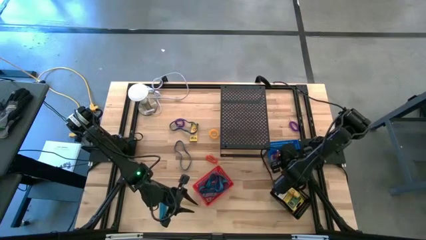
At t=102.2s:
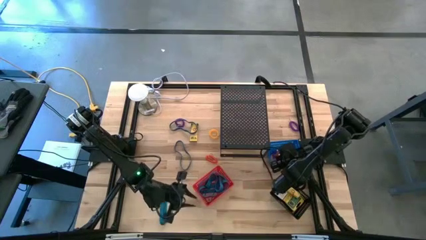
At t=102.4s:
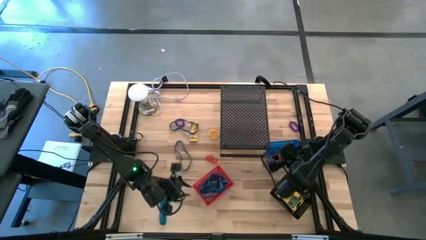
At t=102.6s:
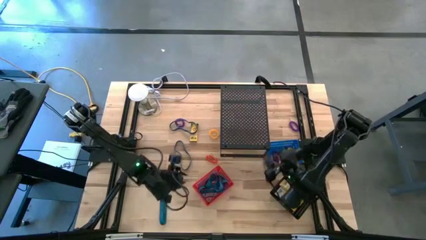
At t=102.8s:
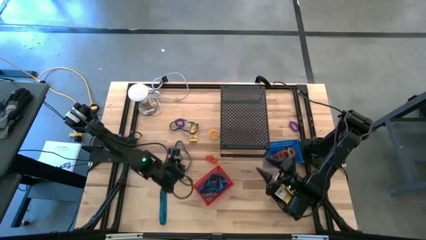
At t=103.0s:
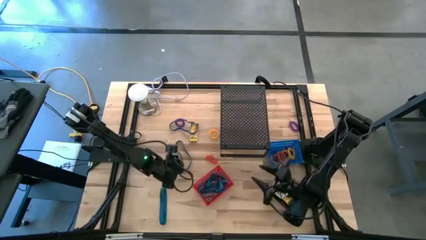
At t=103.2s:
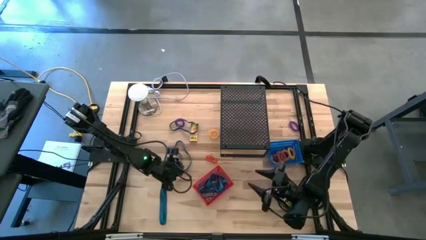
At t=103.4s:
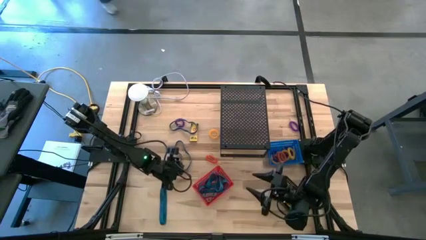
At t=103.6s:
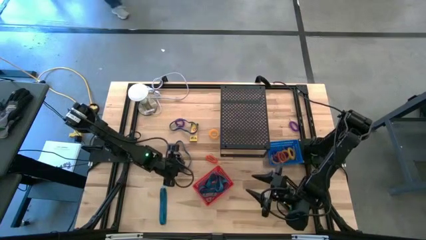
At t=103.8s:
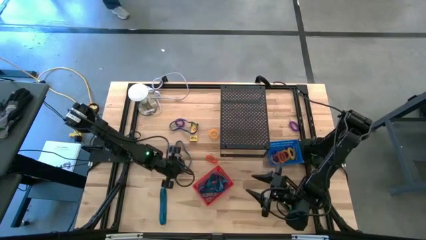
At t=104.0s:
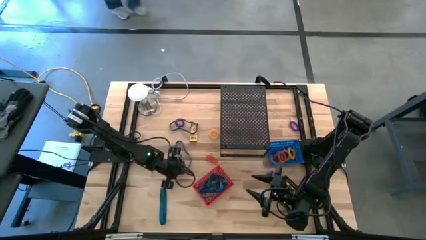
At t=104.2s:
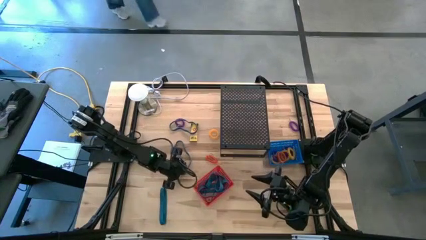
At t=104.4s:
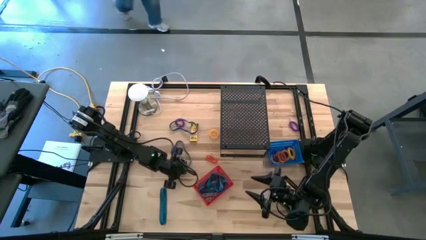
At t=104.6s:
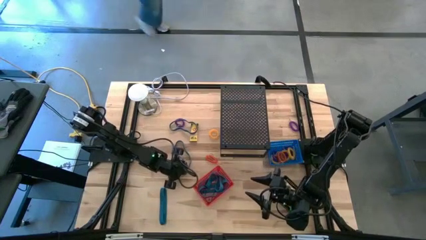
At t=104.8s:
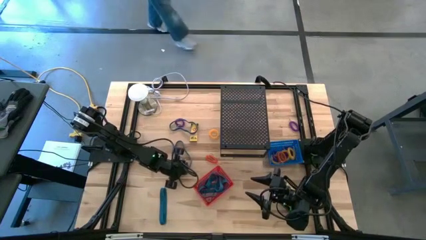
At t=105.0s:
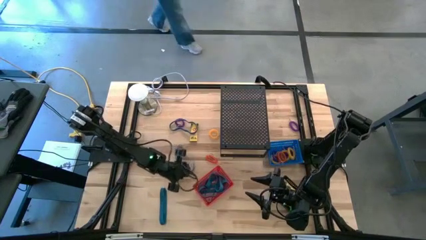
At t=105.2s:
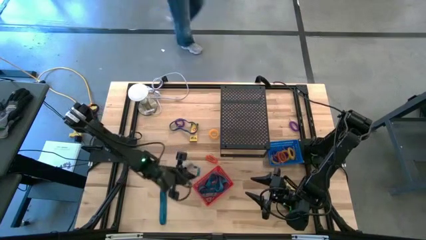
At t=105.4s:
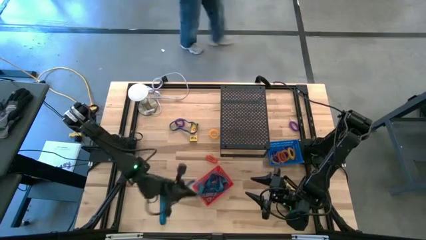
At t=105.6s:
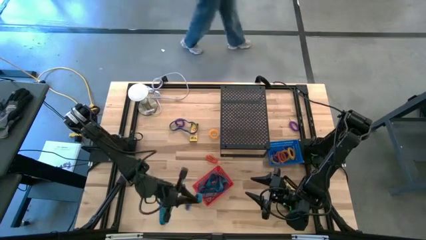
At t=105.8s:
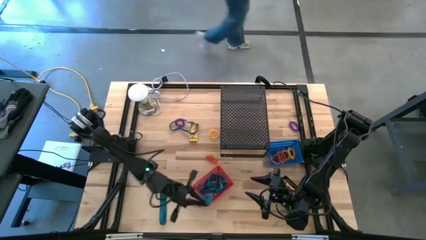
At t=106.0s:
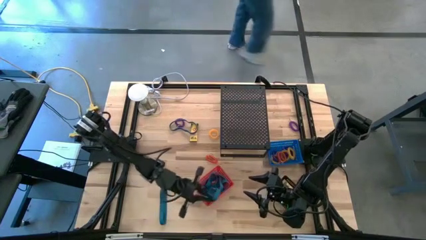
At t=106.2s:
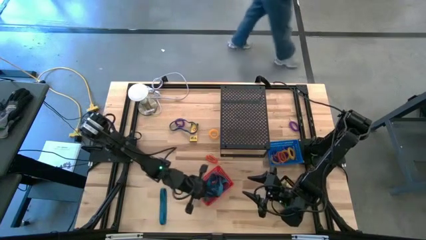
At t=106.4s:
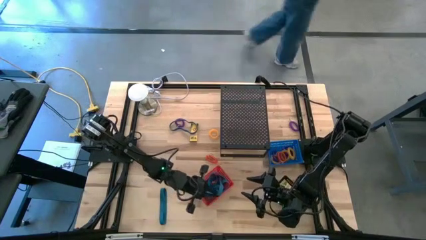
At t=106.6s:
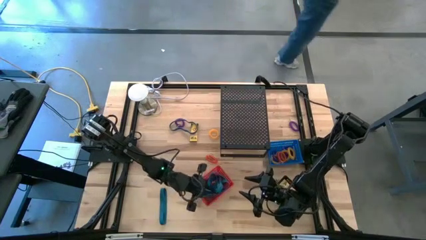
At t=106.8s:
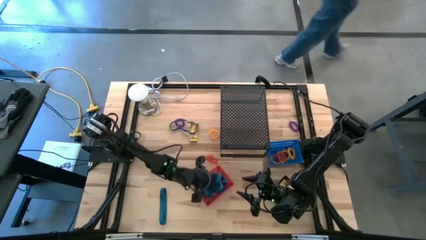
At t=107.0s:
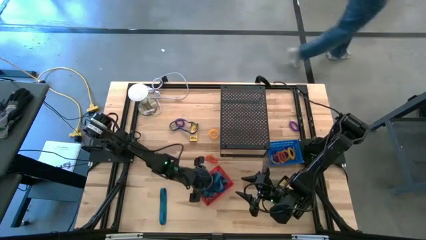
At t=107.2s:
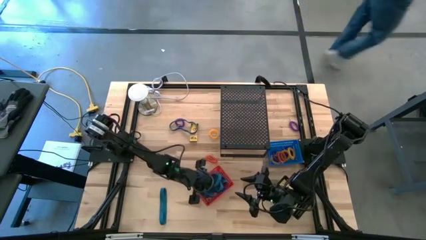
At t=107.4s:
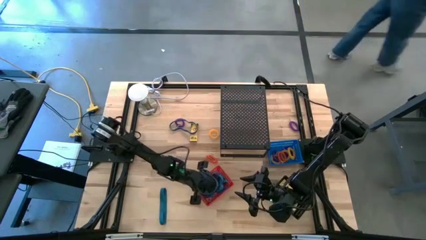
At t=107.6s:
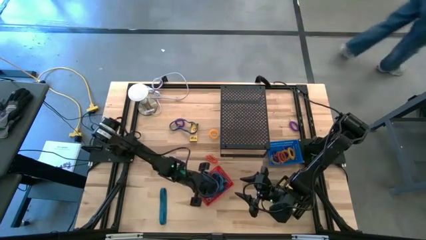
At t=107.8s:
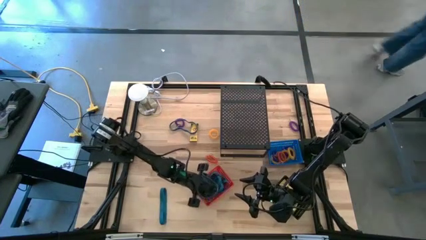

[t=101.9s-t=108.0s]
Task: Pick & Place Office Desk Supplies
Put the blue rubberband into the red basket

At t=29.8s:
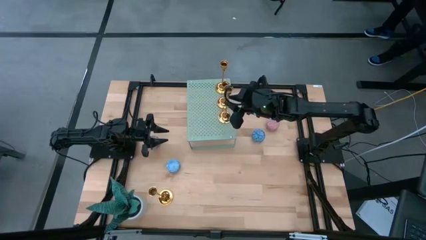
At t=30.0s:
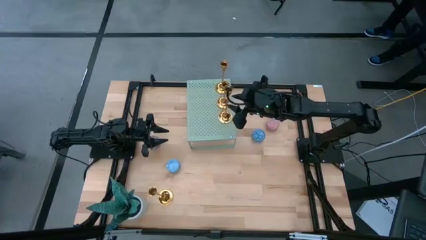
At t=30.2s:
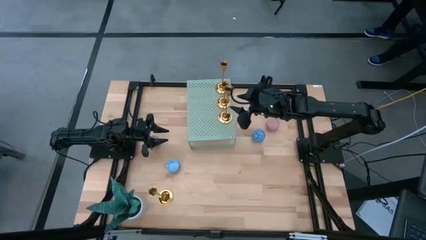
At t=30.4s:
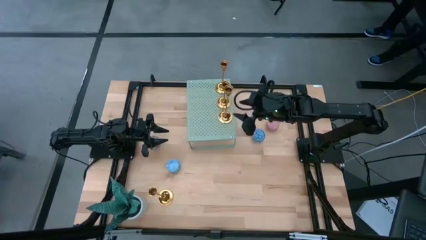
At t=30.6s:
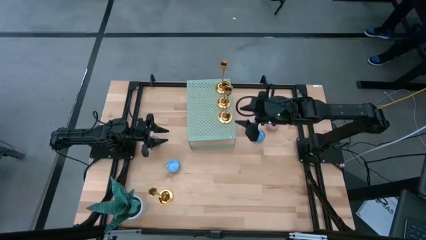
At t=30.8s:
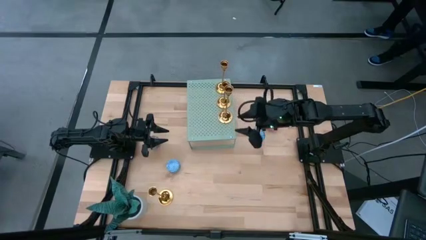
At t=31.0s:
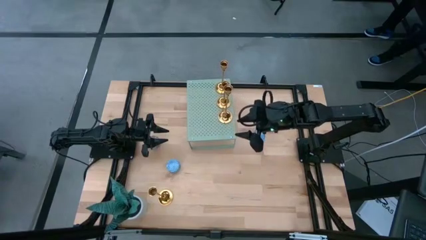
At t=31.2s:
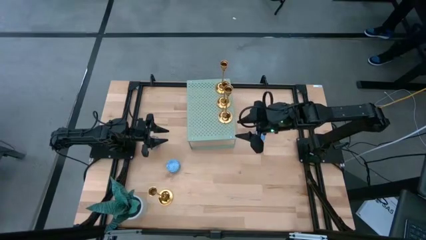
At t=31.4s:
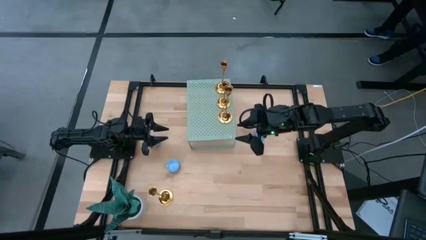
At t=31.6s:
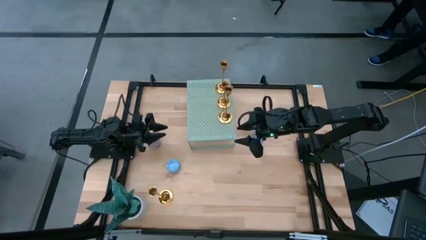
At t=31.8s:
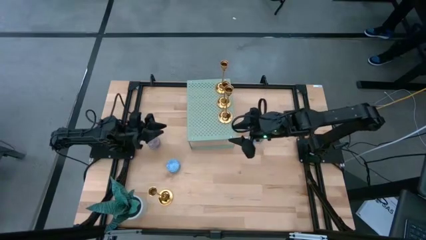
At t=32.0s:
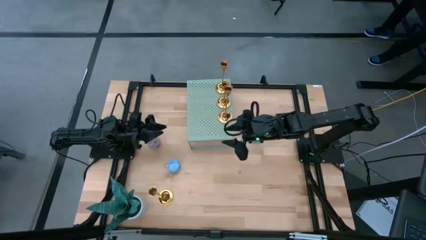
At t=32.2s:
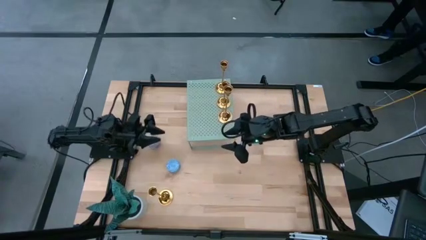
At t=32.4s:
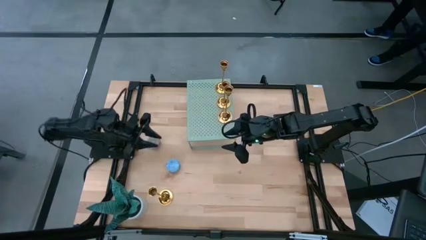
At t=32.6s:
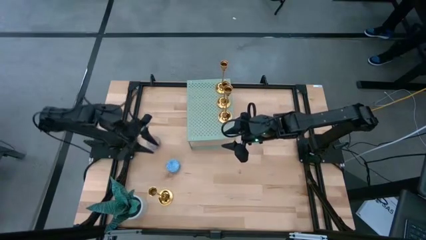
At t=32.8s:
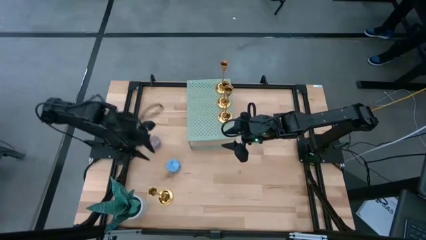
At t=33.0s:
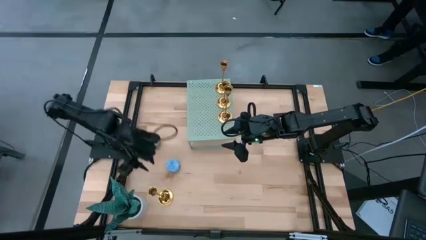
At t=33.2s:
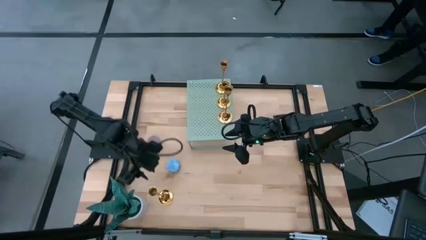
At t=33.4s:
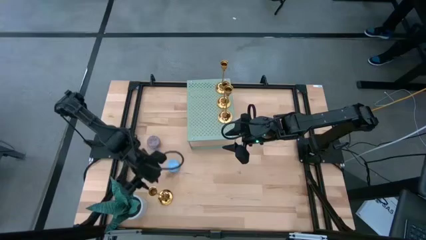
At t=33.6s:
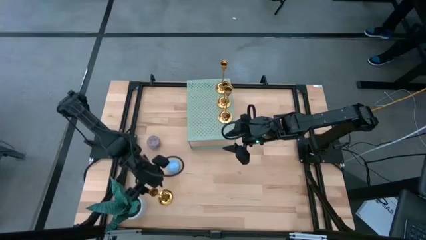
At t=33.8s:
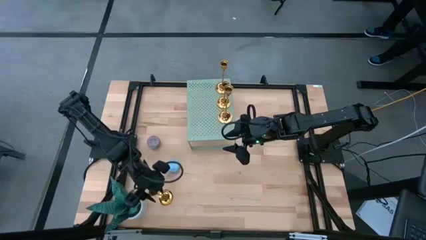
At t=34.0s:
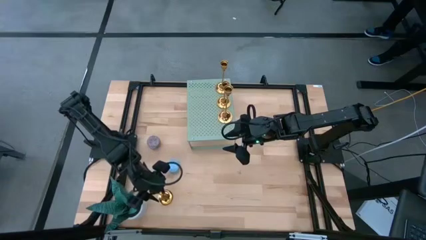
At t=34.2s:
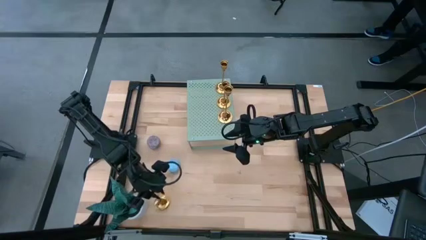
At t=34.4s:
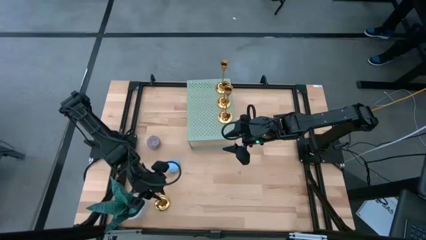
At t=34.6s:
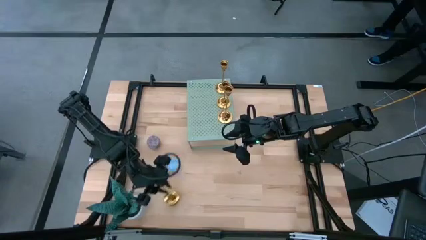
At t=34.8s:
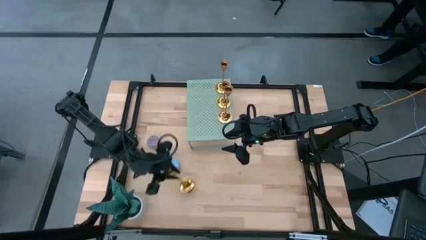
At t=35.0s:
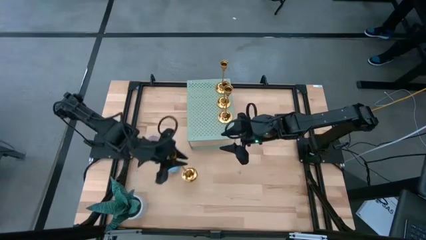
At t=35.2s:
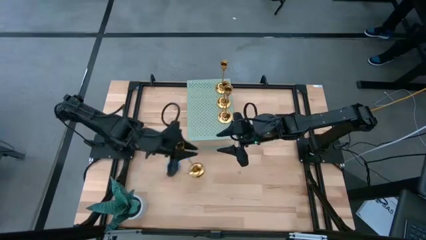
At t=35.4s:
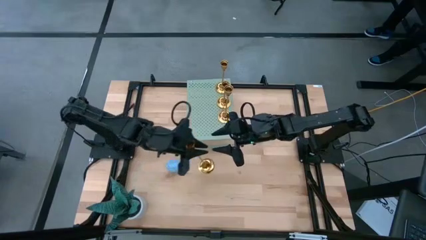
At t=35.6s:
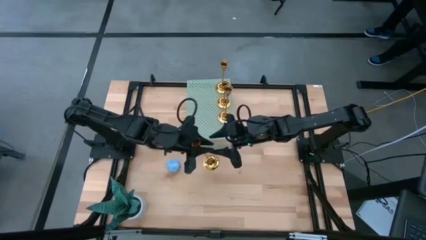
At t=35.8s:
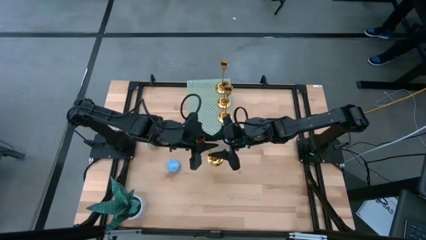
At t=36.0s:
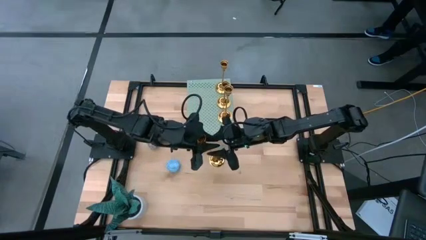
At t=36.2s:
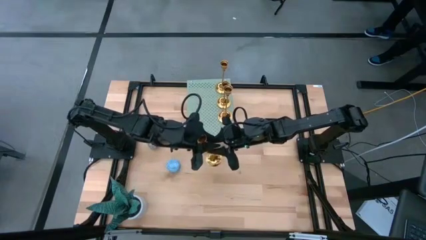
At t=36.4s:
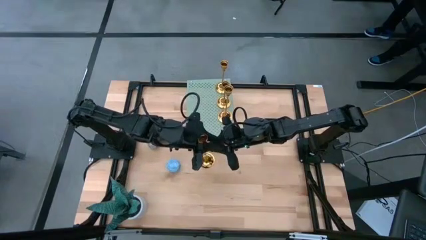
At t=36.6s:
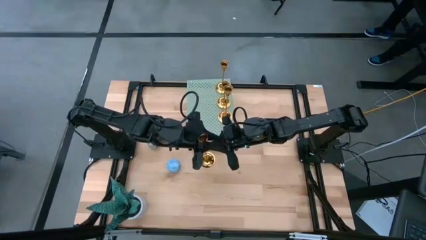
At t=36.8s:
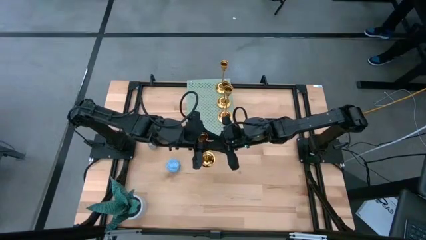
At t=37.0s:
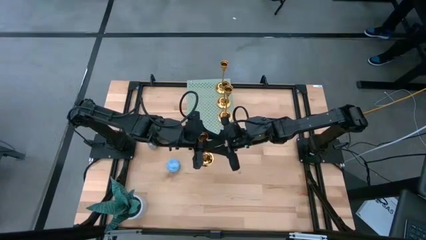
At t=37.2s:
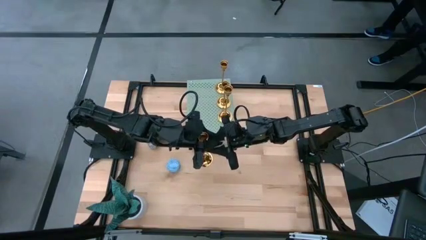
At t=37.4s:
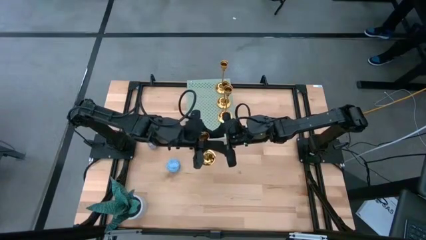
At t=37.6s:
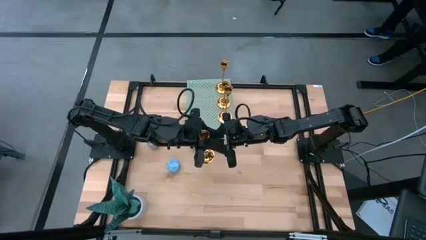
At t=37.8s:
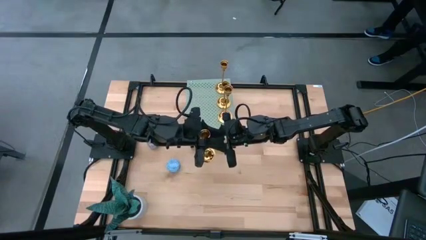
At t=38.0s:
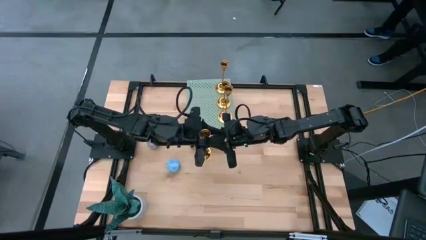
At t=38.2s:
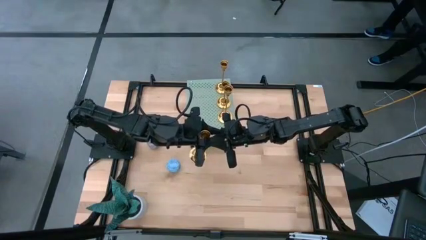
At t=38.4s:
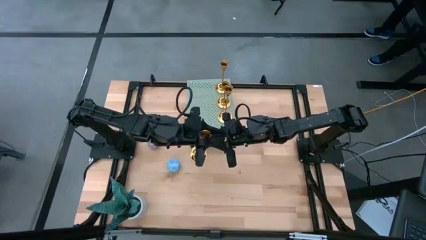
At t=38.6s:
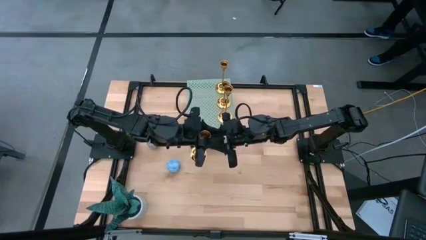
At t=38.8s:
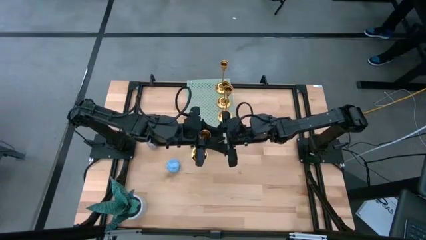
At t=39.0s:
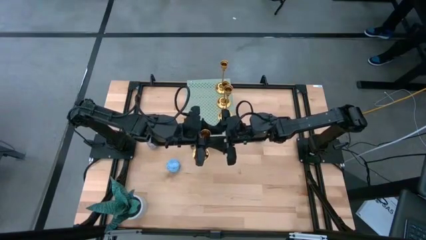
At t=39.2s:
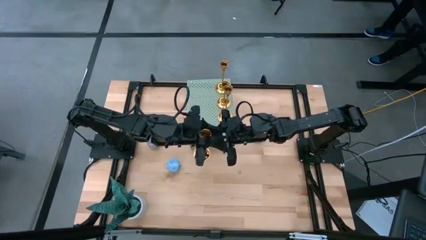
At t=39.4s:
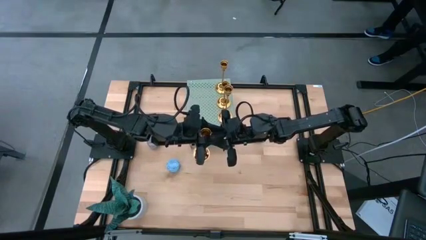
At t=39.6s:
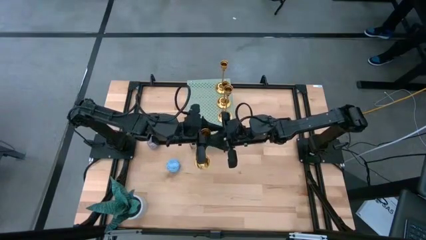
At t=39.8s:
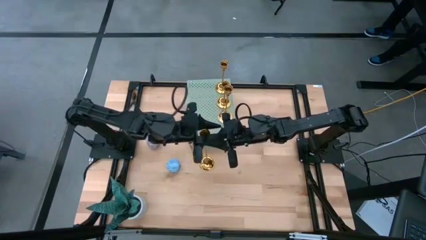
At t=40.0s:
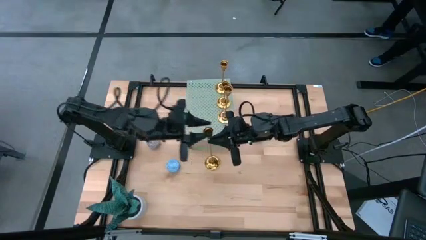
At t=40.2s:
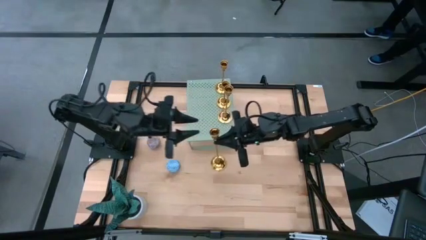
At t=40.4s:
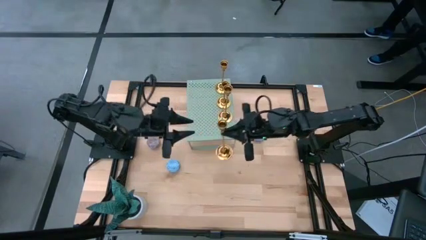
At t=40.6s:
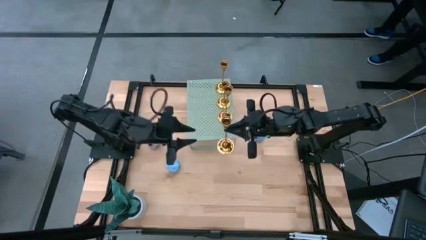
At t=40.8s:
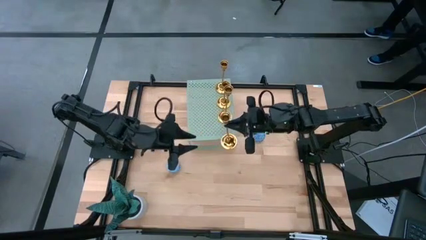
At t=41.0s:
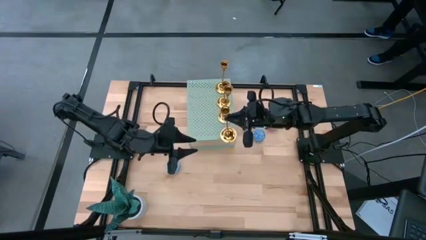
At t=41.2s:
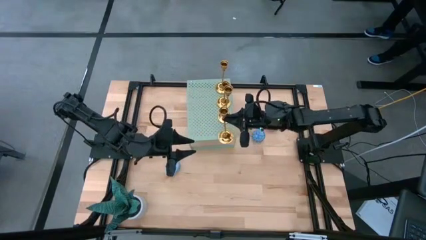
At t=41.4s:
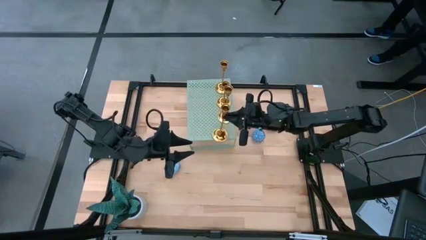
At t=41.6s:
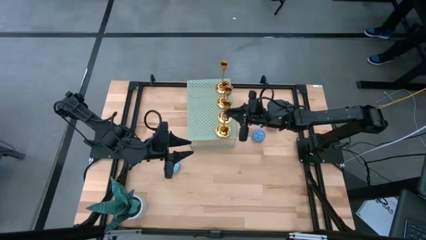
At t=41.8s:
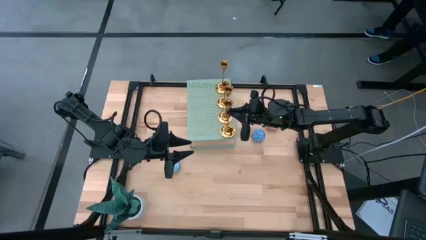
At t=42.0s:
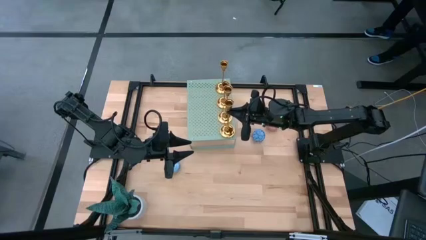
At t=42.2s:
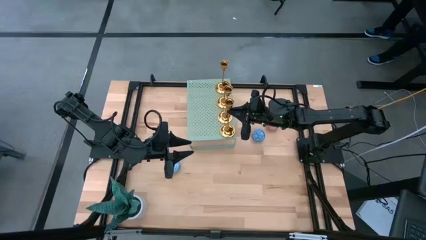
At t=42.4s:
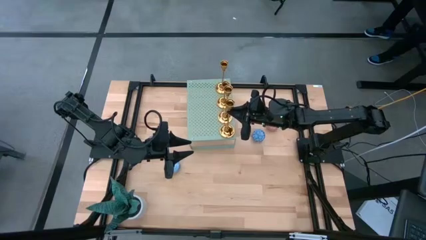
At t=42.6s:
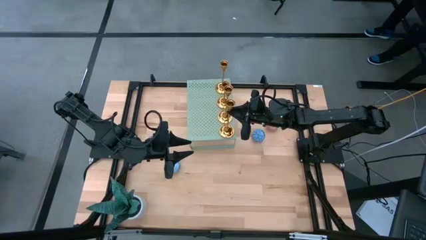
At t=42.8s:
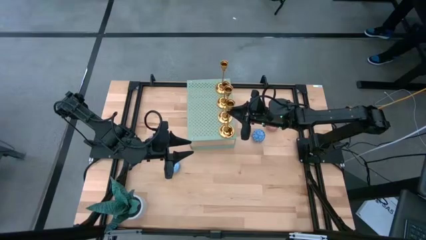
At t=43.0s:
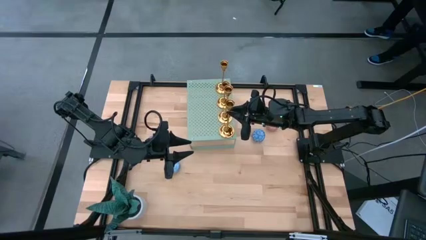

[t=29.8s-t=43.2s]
Task: Pick & Place candle stick holders
Align the gold candle holder with the other gold candle holders on the shelf
